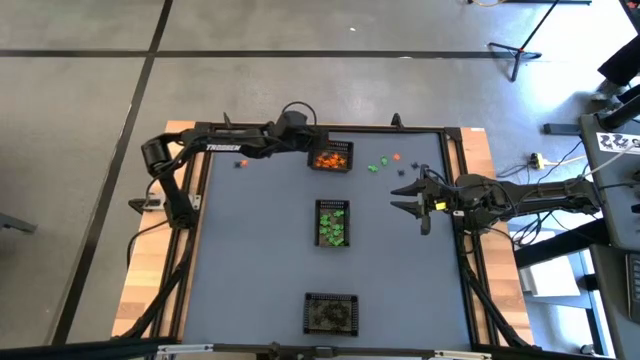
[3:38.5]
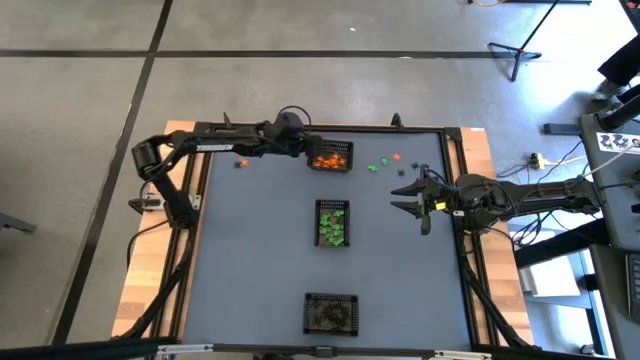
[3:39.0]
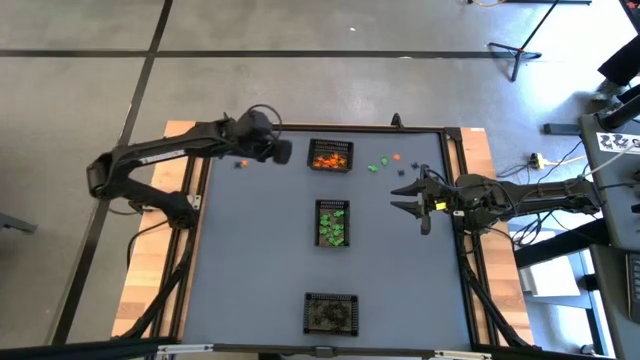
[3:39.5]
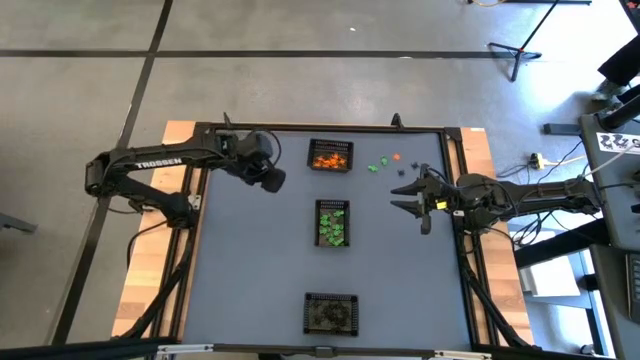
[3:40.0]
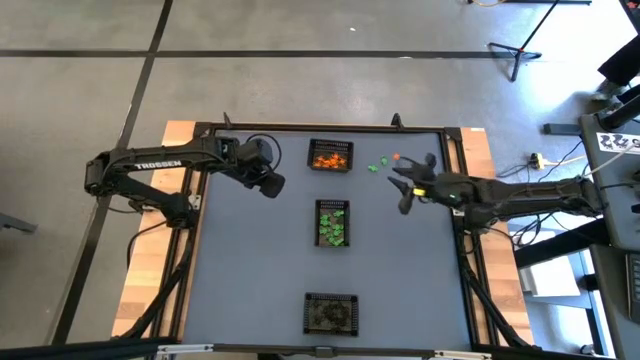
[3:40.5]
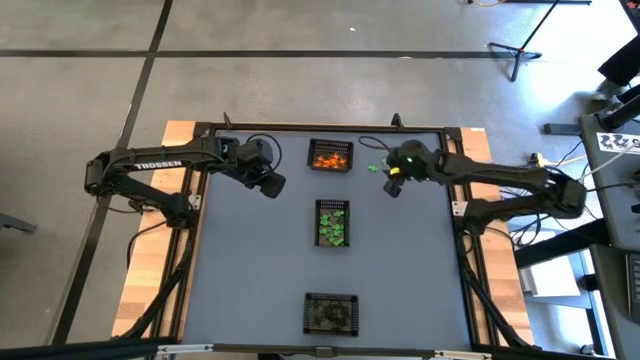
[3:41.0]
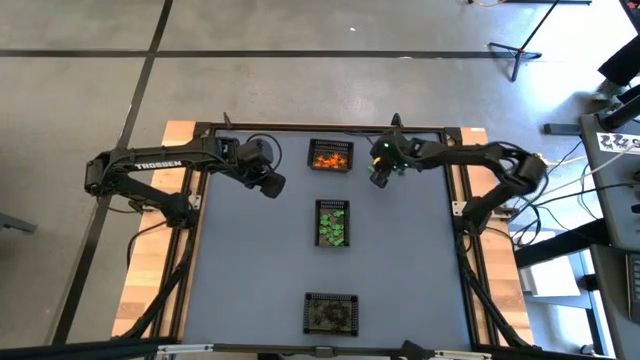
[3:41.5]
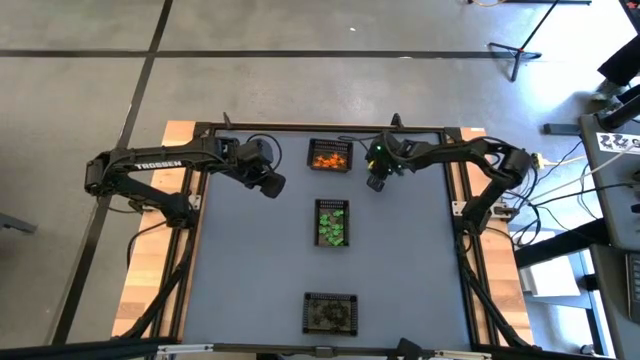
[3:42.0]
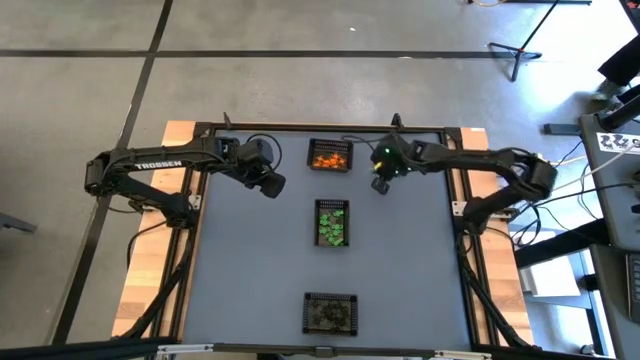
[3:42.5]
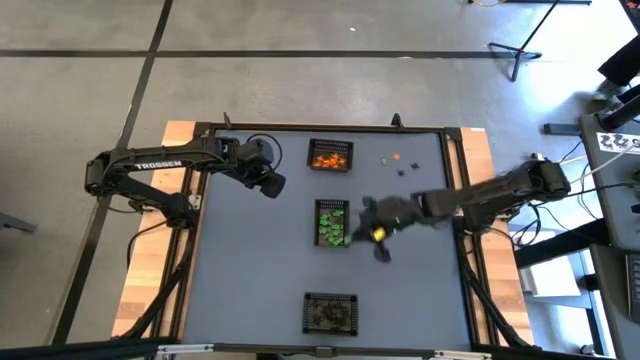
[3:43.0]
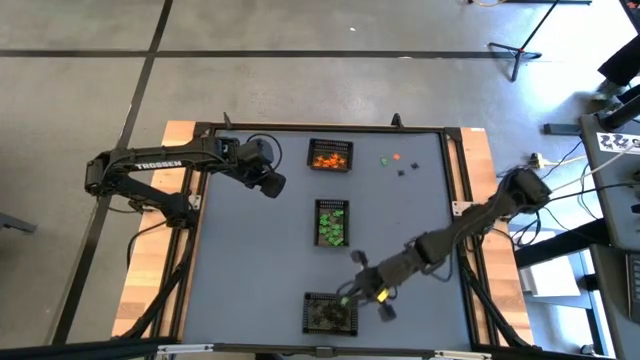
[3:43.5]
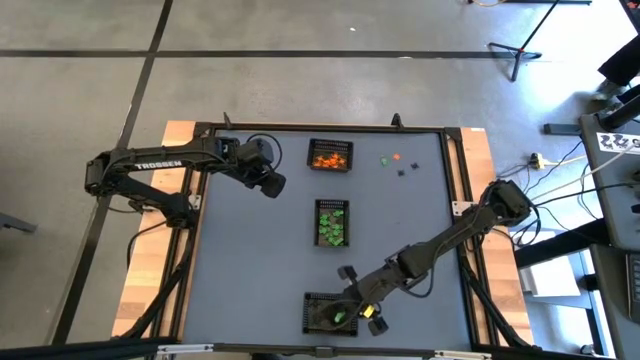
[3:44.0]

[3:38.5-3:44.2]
Task: Sort Halloween decoration
Put the green skeleton toy into the center black bin

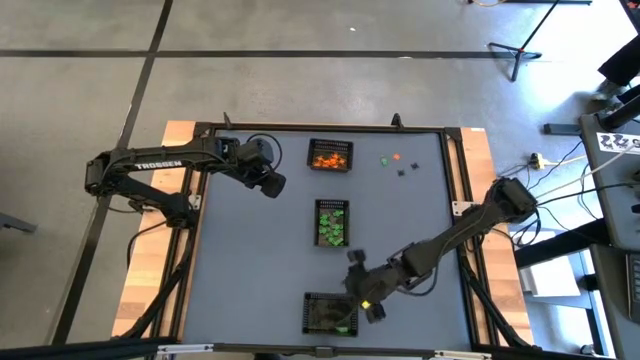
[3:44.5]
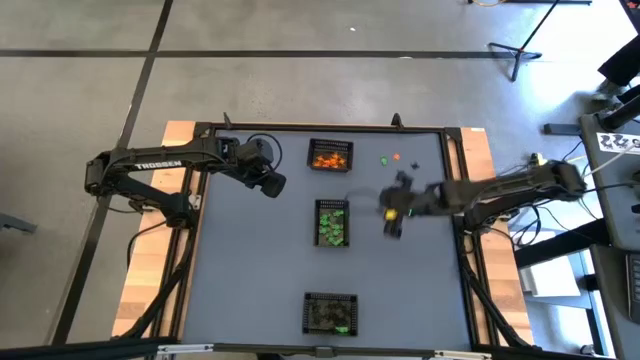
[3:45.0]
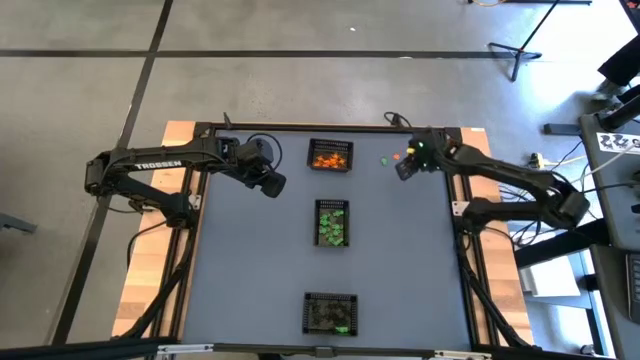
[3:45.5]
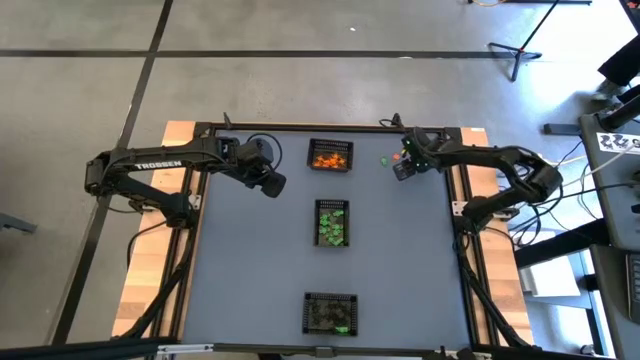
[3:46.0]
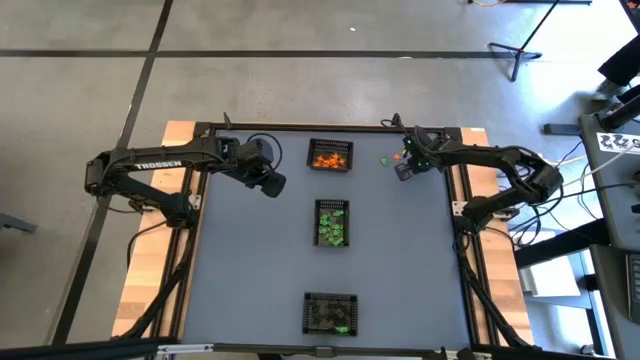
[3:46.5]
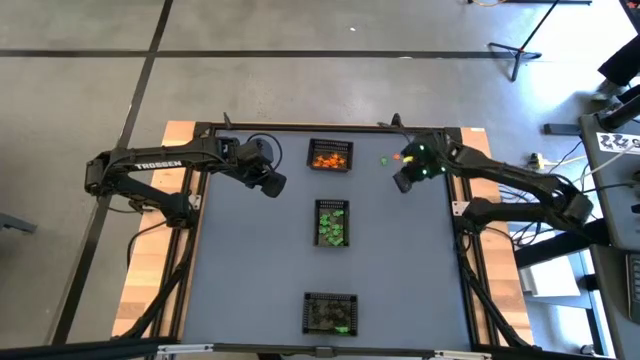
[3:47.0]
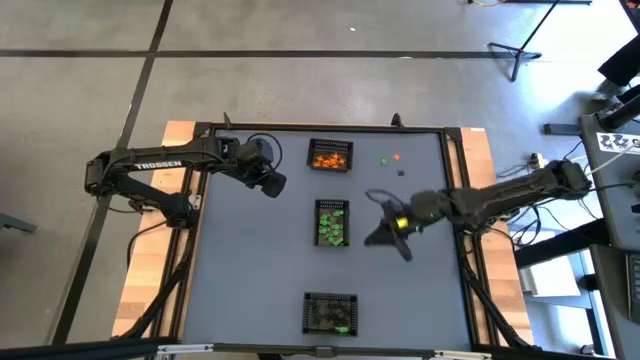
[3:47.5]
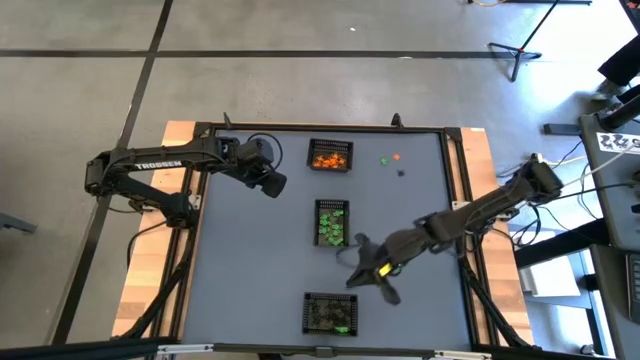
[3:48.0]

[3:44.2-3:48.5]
Put the black spider toy into the bottom black bin

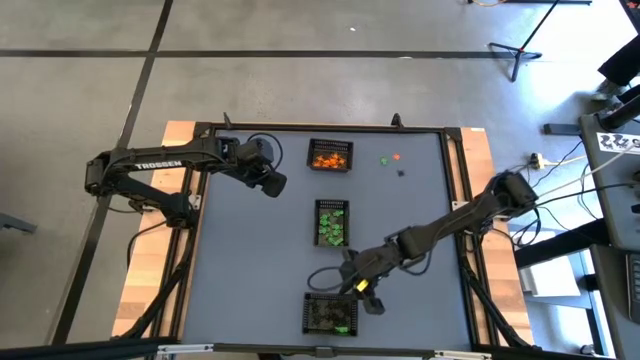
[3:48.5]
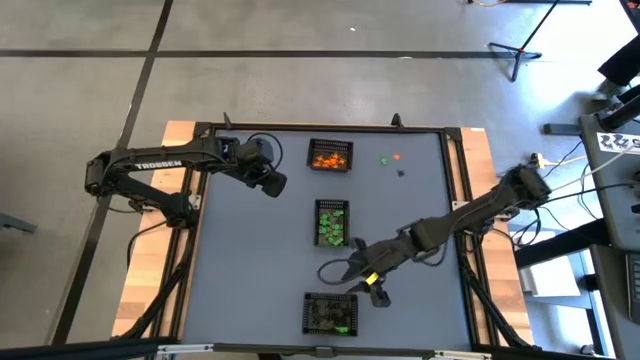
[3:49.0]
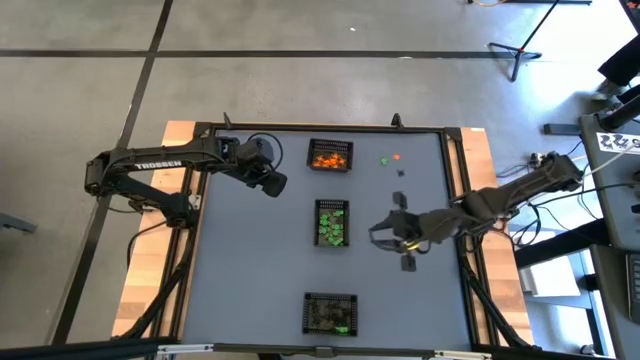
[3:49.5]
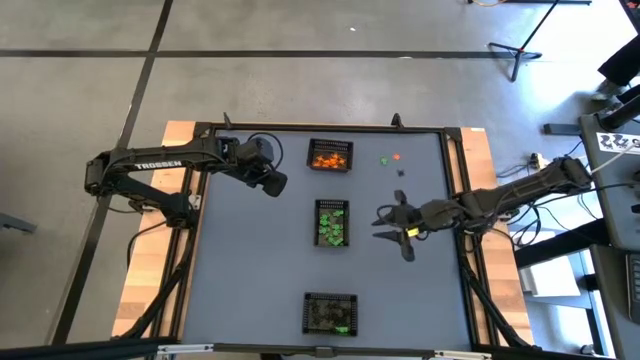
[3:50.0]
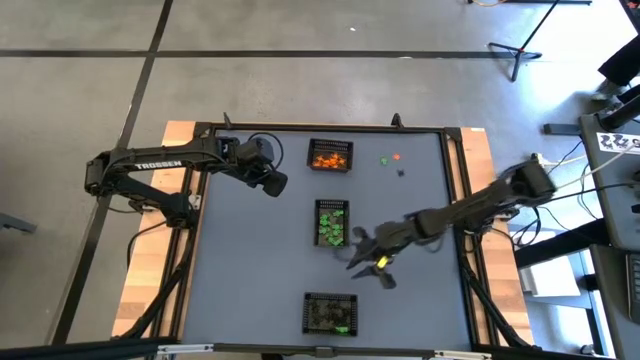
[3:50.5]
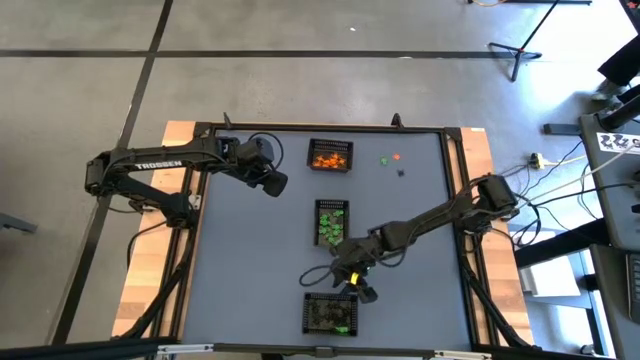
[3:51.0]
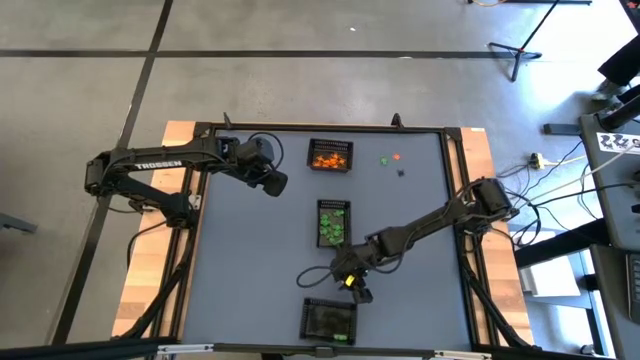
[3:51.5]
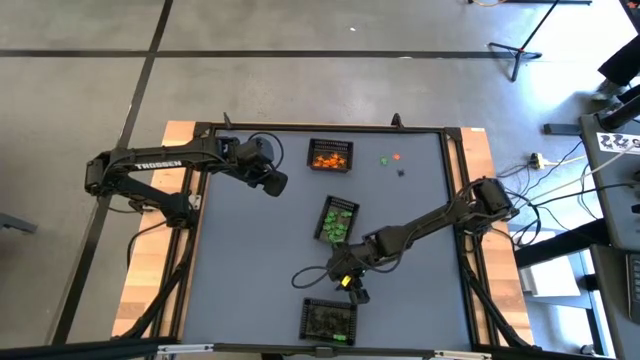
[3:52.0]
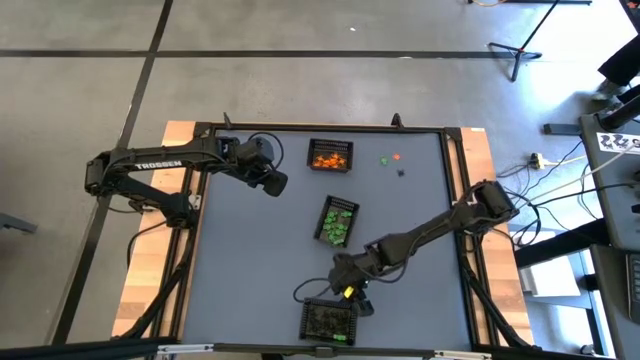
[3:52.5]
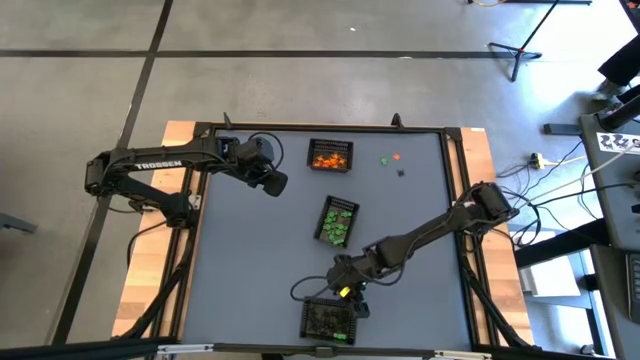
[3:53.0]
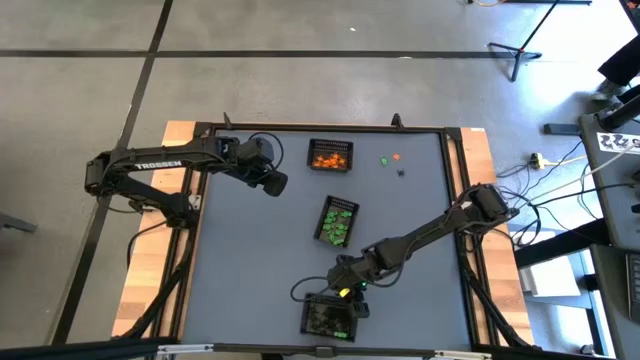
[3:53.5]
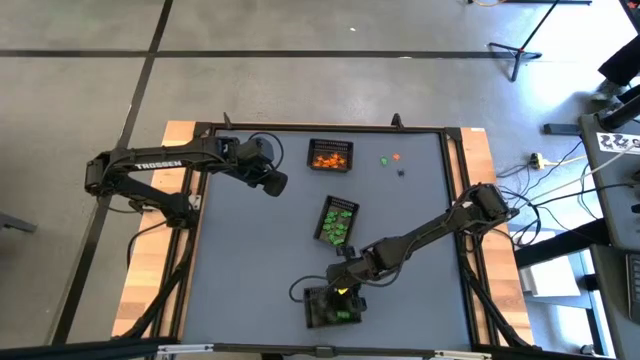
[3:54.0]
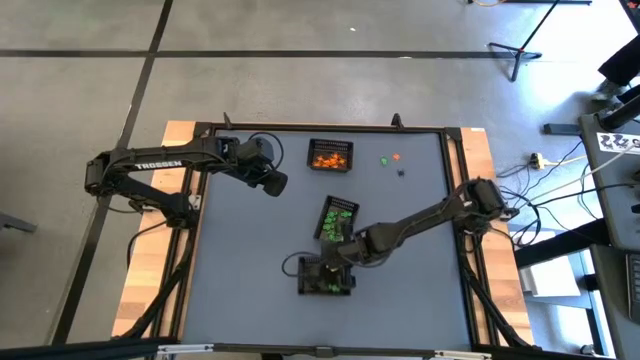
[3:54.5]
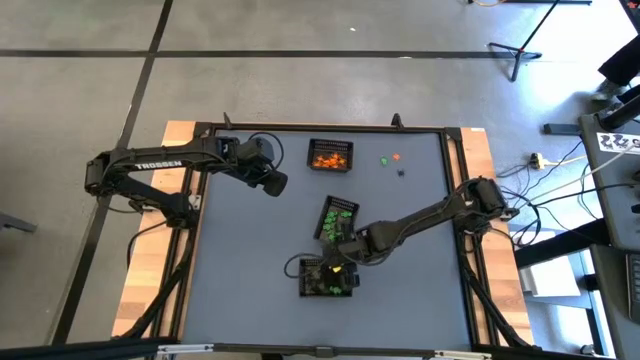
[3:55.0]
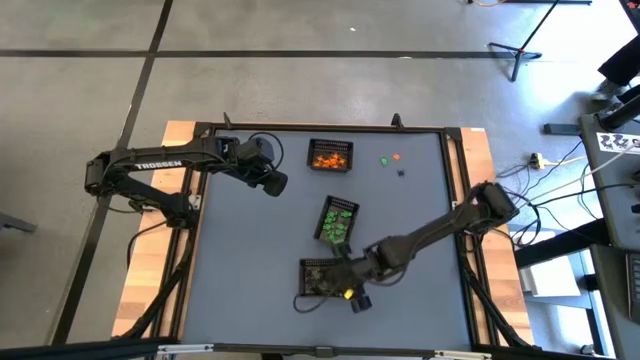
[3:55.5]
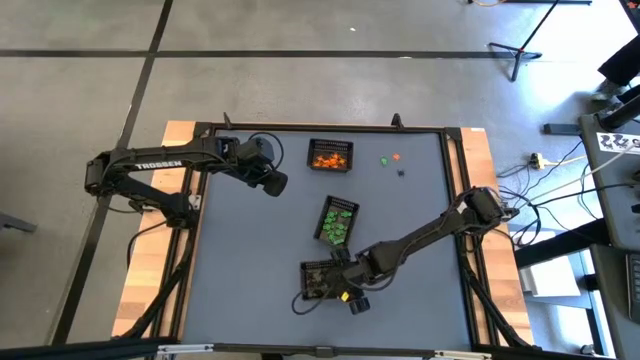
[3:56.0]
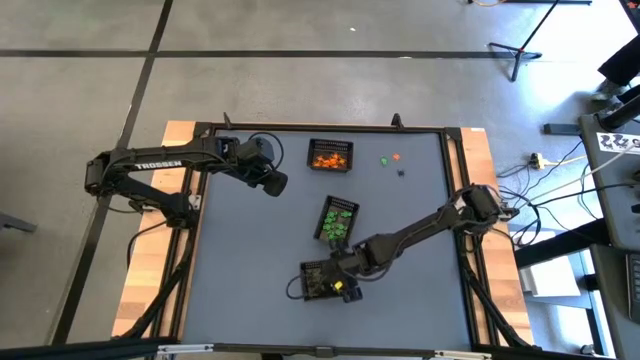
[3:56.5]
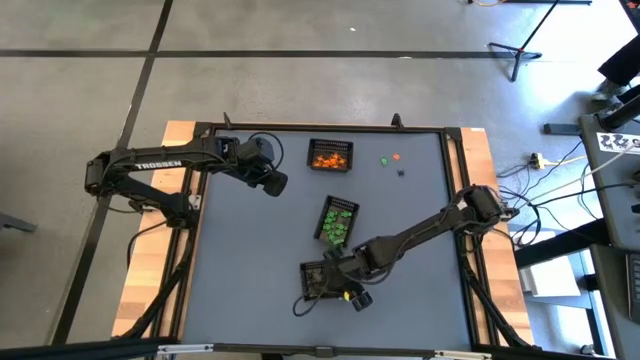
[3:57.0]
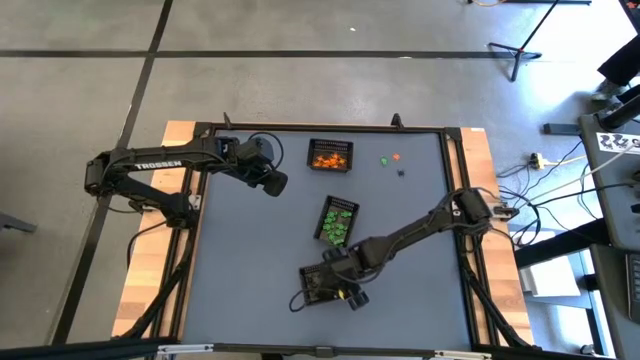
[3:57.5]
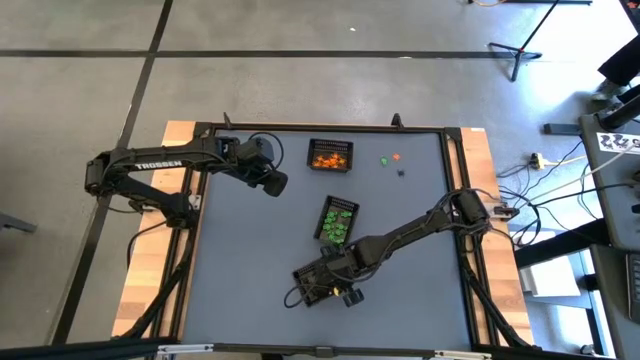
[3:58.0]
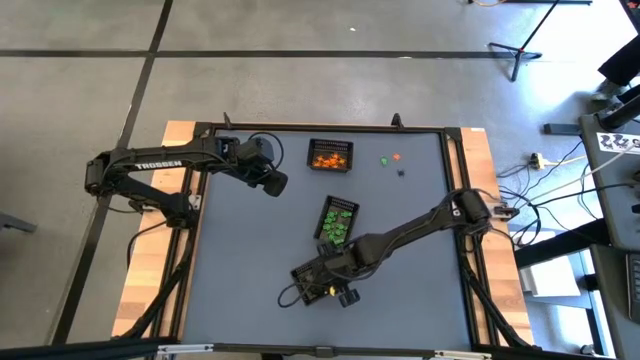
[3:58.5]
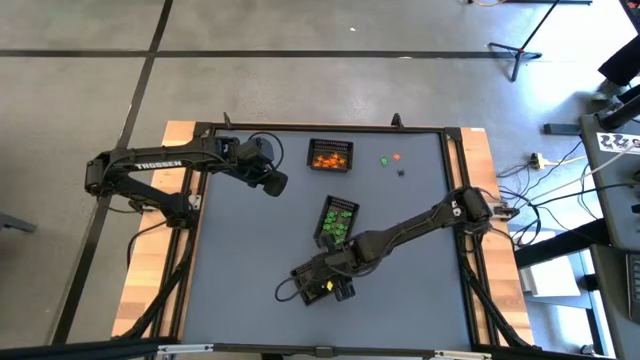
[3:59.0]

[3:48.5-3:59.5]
Put the green skeleton toy into the center black bin
